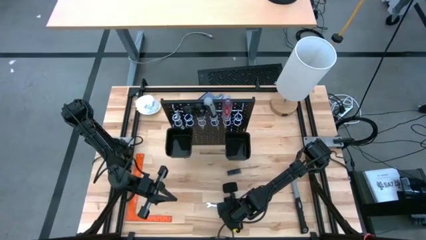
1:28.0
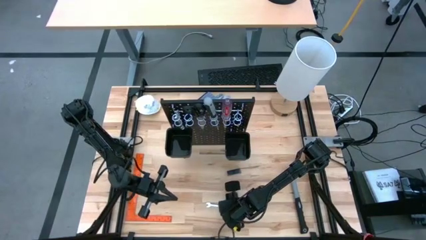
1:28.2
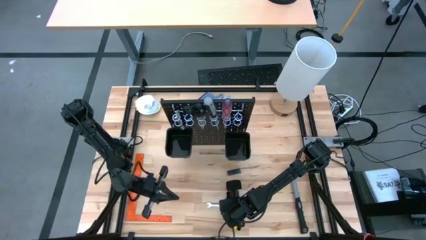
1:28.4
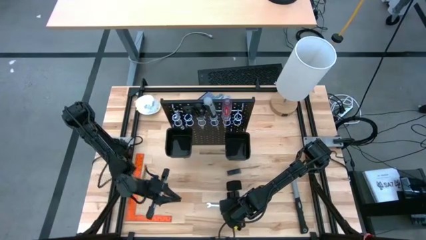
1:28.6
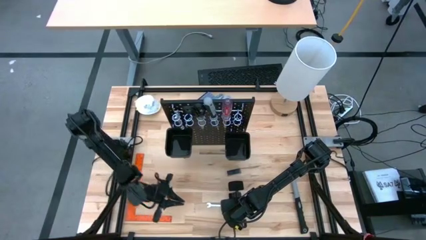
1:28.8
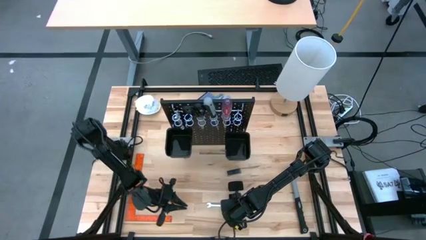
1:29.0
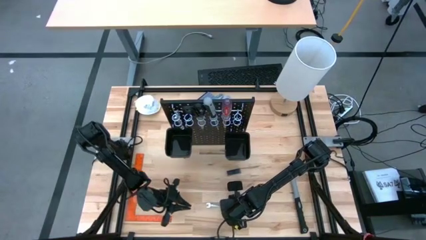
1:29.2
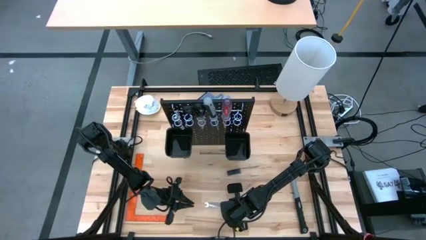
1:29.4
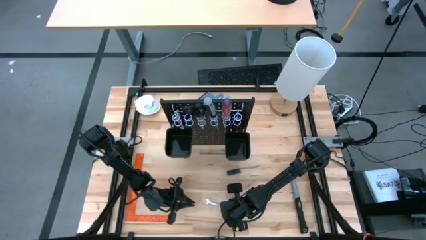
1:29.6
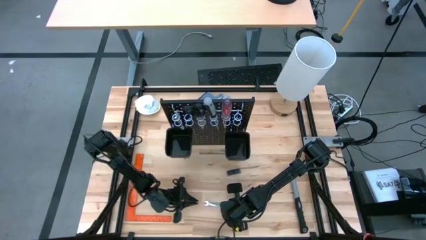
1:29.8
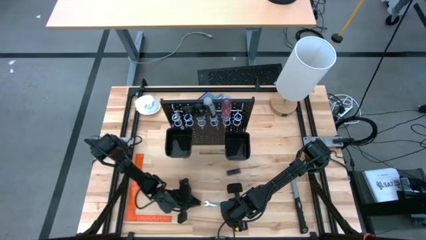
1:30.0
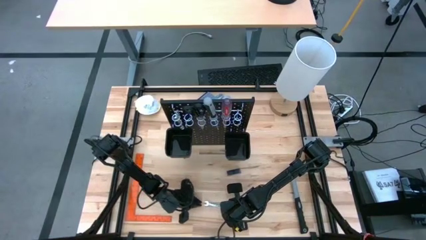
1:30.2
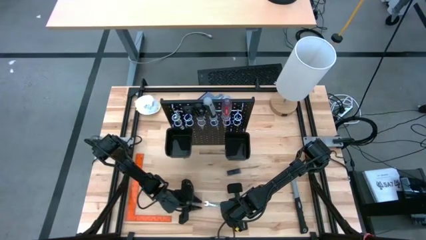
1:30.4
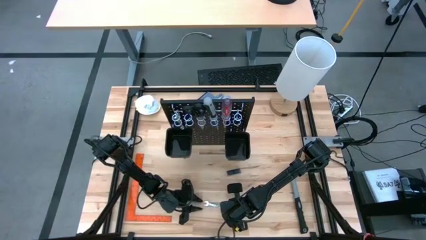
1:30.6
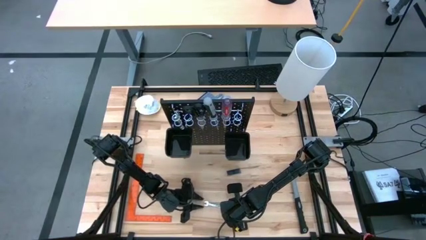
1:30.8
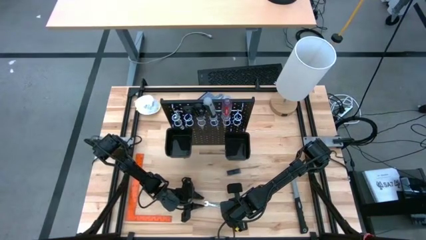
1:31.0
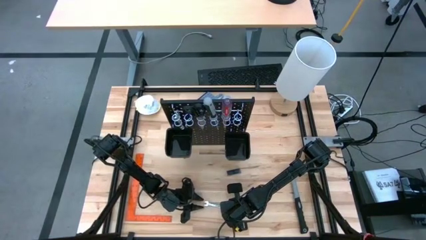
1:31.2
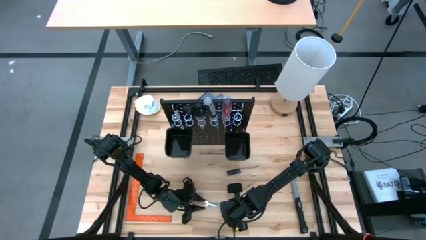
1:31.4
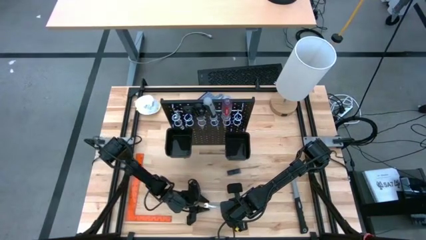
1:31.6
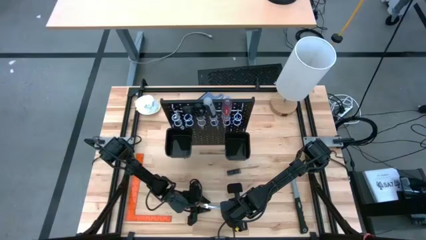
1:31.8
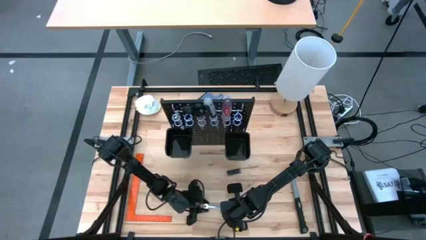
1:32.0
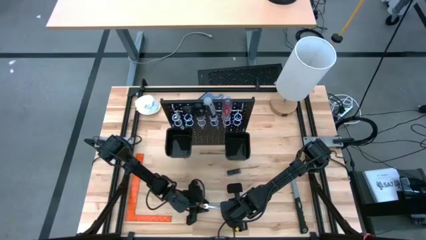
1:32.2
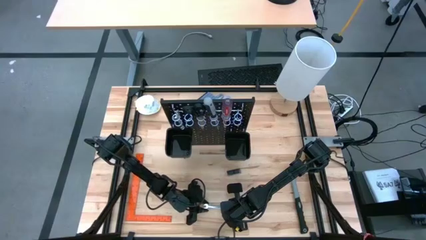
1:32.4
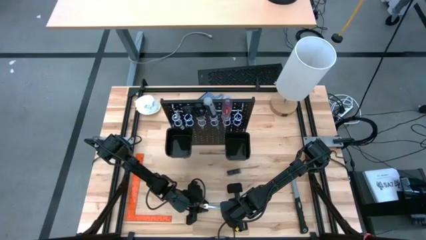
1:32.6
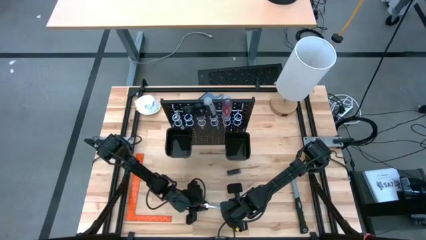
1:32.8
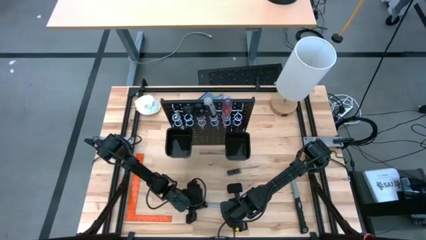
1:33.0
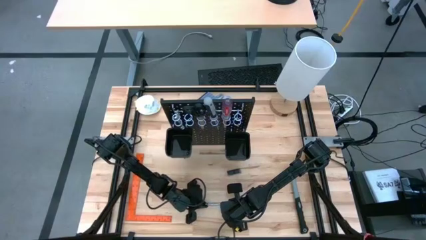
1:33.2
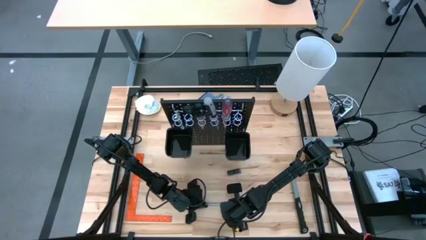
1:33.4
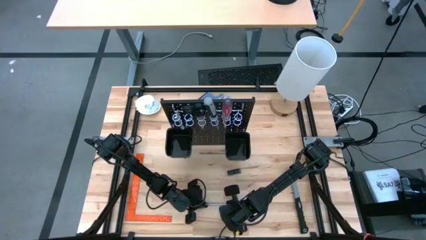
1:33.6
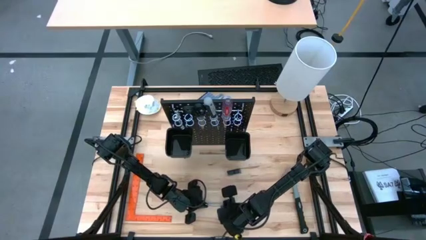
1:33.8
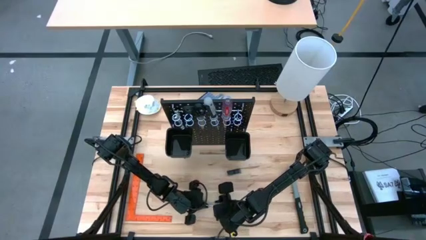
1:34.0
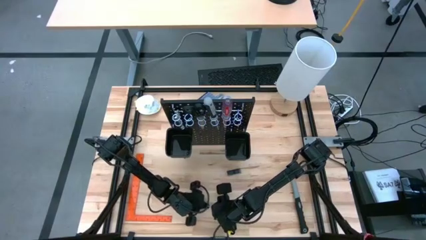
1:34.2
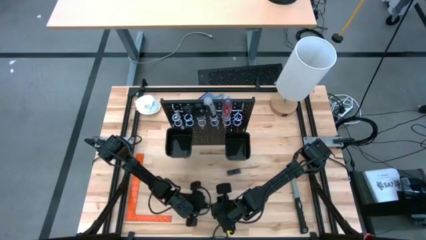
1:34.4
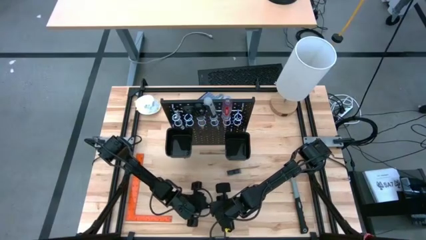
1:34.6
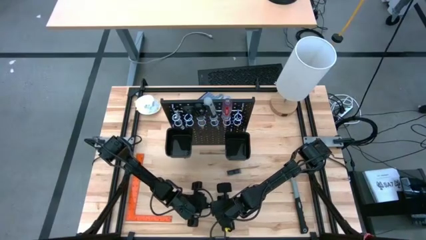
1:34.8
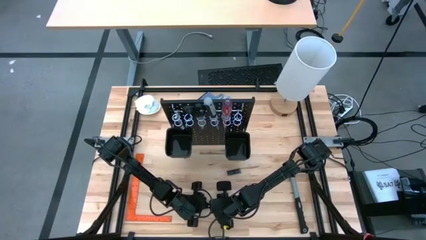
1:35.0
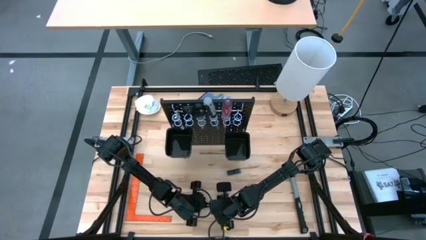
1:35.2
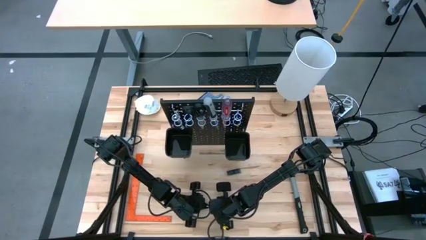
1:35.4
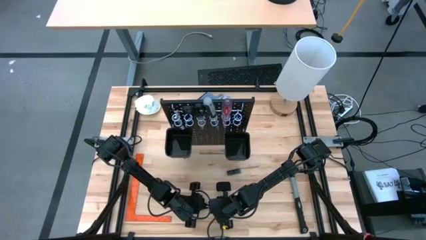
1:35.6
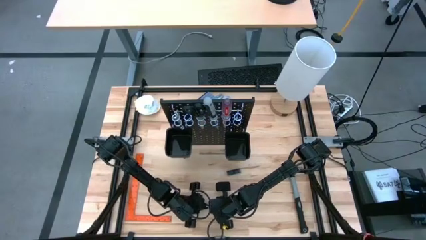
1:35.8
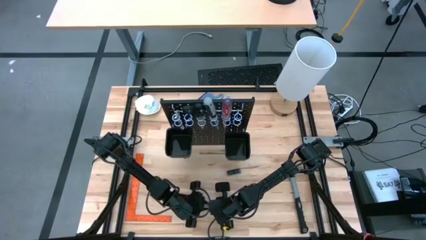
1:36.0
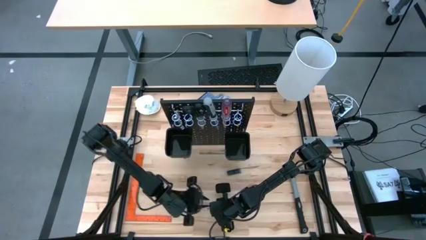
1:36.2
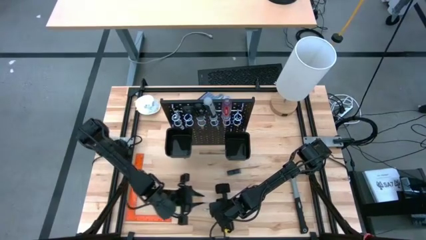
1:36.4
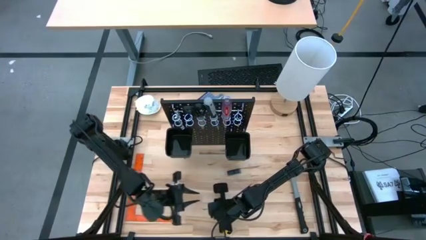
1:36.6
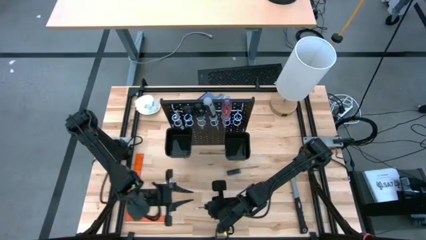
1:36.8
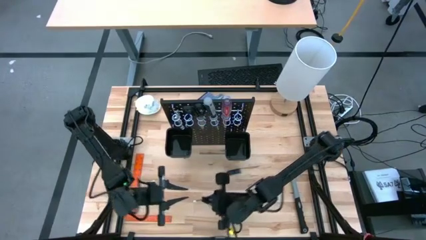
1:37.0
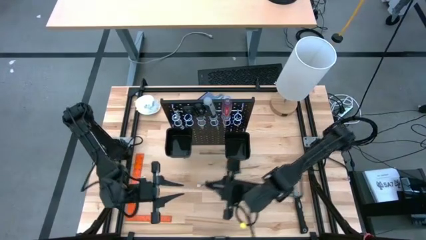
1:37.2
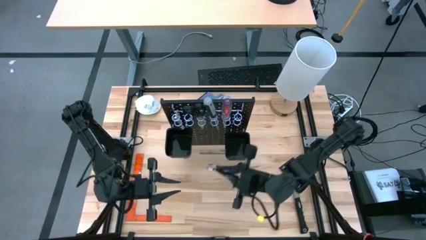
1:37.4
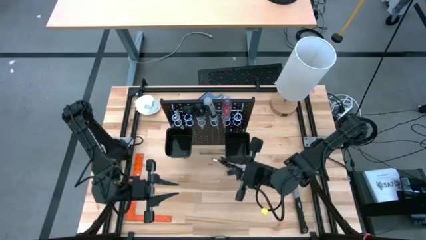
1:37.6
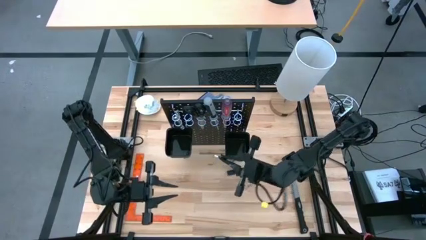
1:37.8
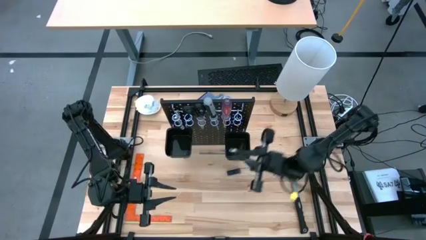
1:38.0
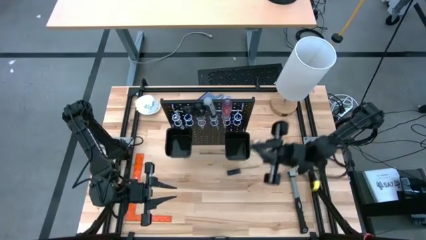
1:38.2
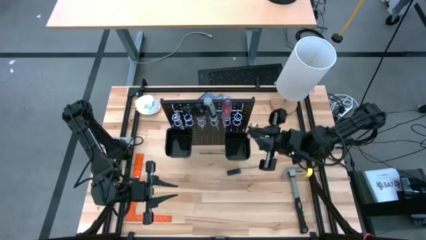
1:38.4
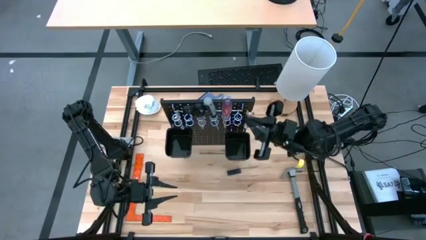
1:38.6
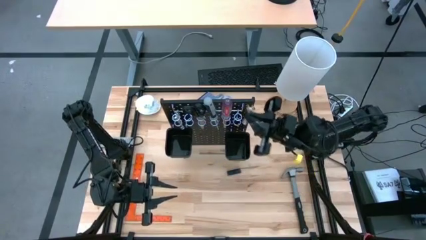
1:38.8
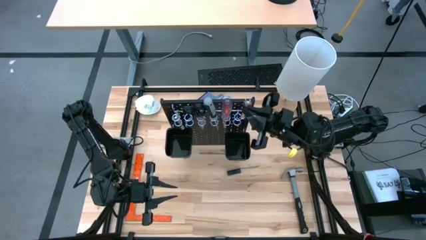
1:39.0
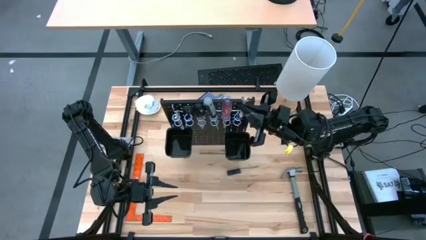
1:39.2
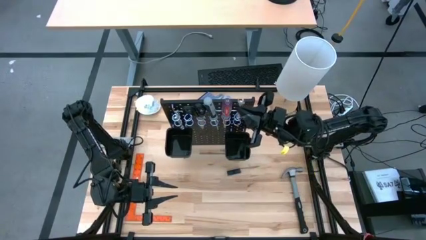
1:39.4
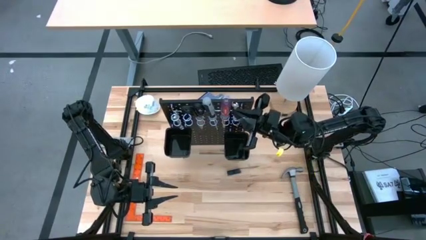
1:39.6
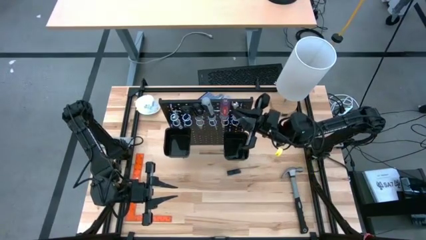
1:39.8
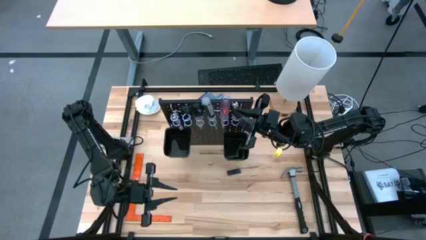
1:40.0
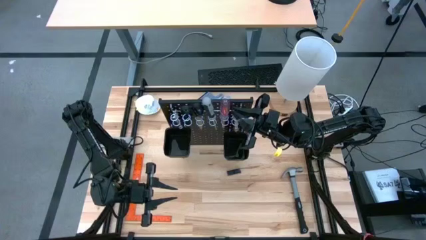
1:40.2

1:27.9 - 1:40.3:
Task: Hang tools onto peg board
Hang the silver wrench on the black peg board
